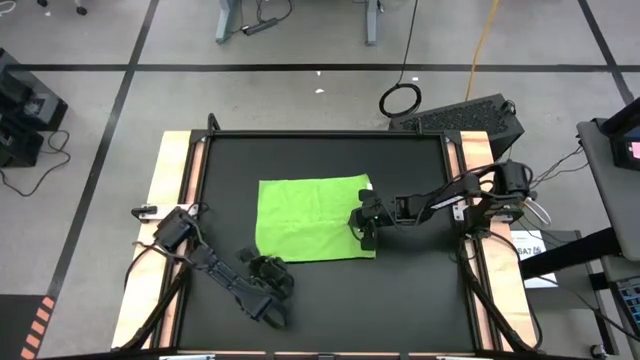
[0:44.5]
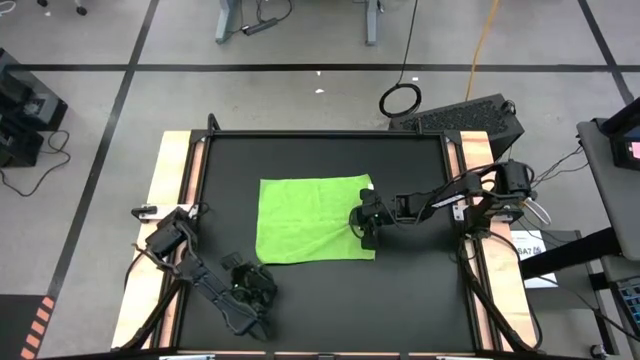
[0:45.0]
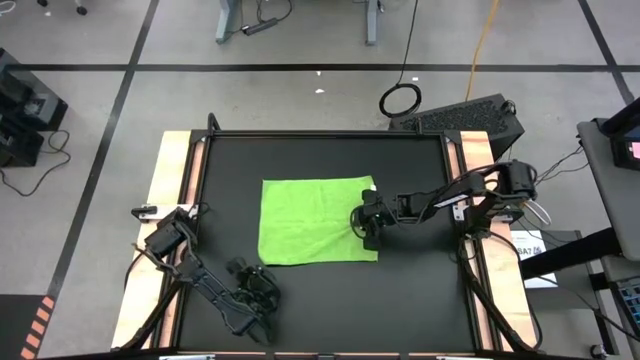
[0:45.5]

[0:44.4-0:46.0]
Task: Roll towel
Fold green microfiber towel

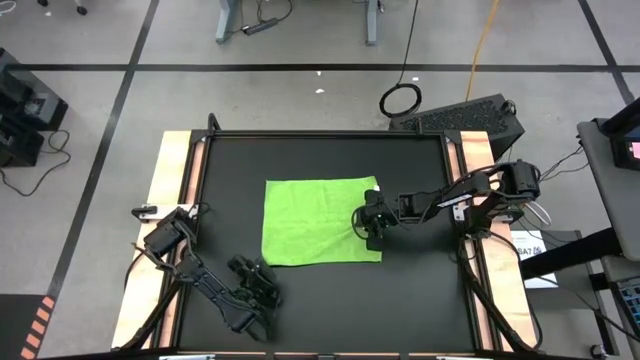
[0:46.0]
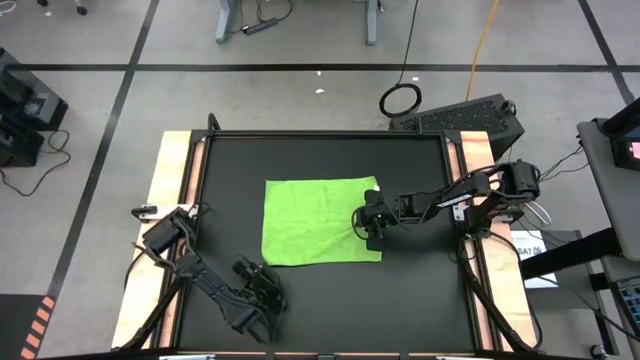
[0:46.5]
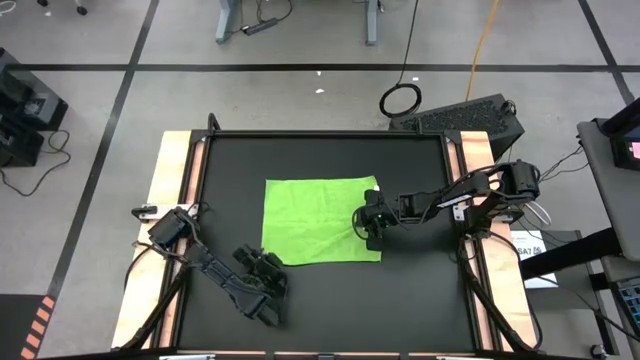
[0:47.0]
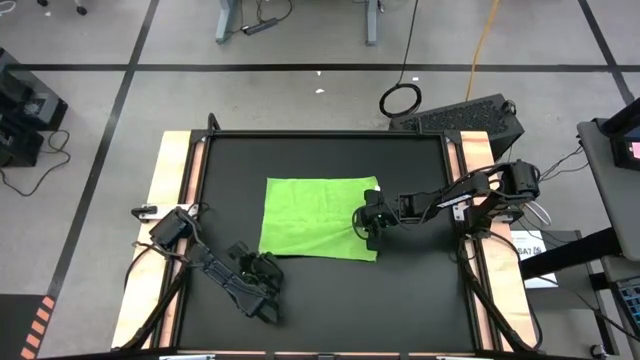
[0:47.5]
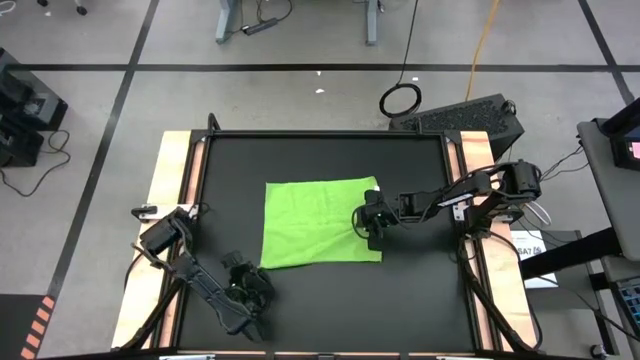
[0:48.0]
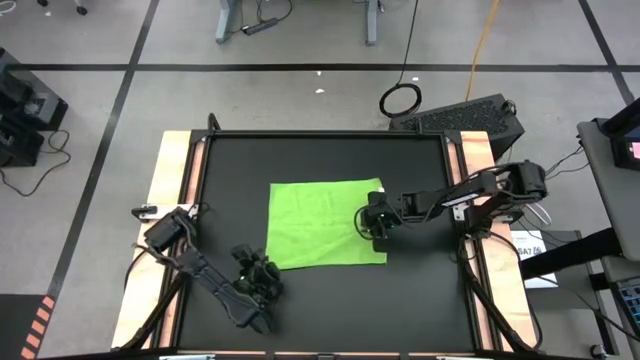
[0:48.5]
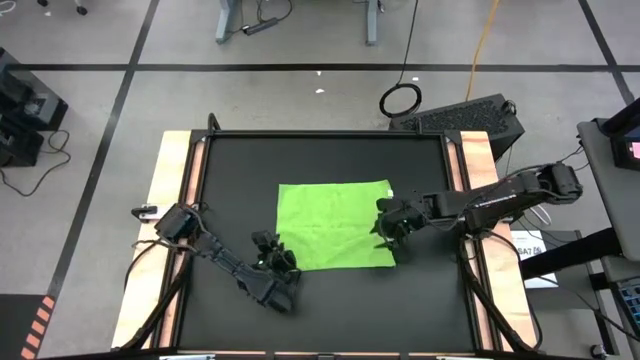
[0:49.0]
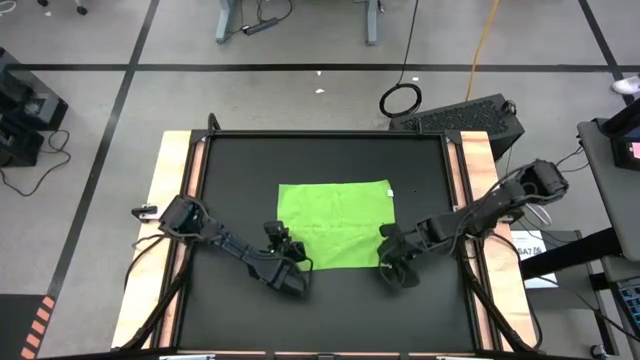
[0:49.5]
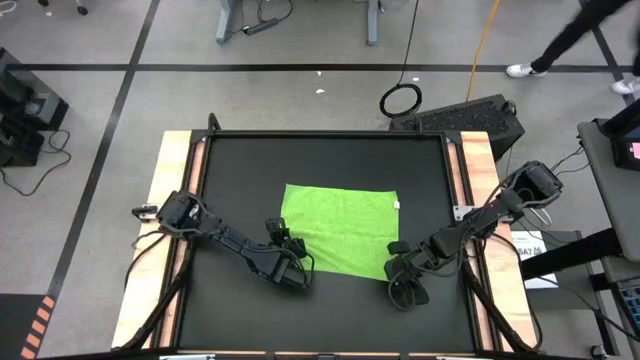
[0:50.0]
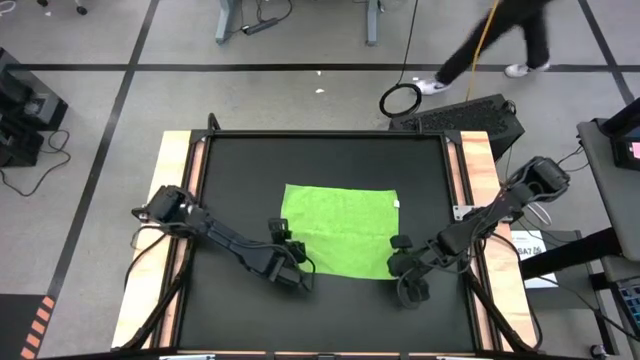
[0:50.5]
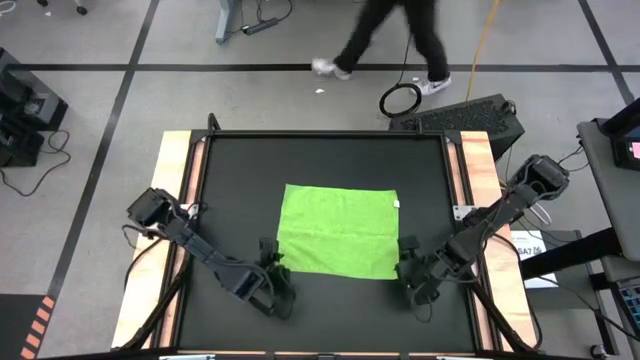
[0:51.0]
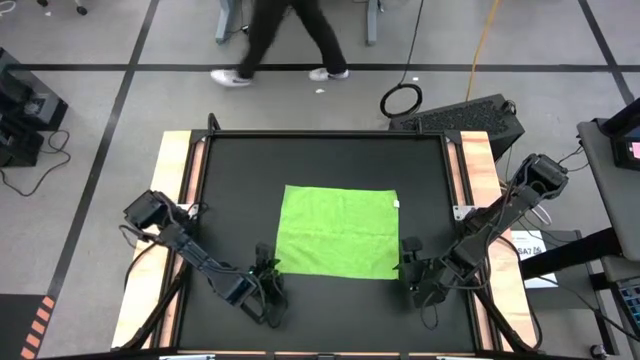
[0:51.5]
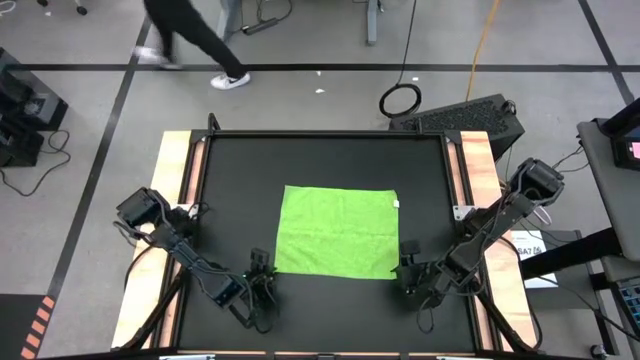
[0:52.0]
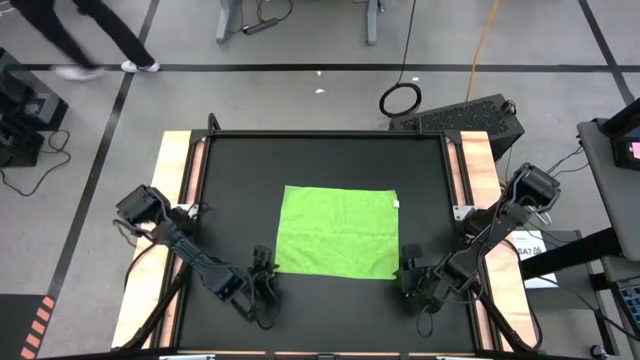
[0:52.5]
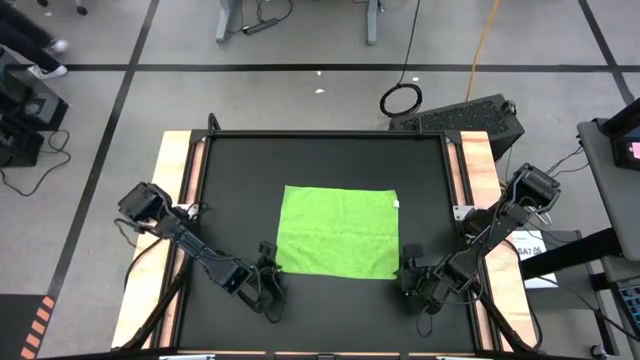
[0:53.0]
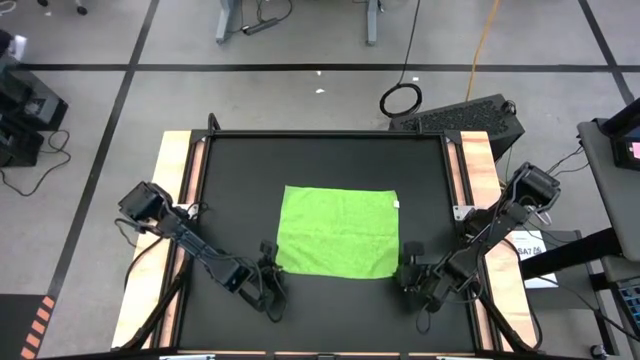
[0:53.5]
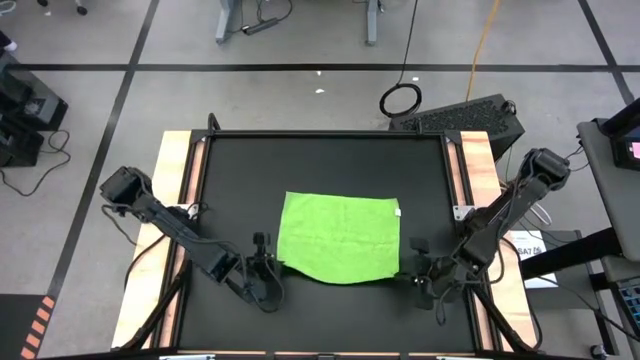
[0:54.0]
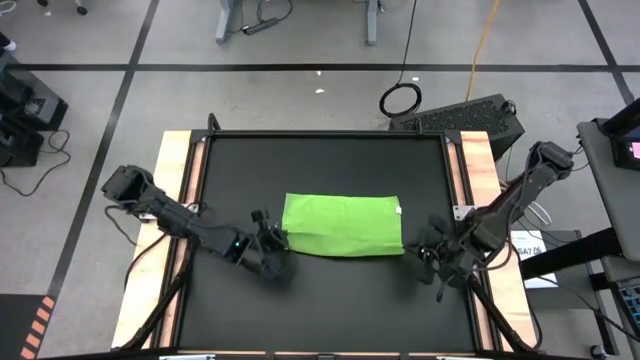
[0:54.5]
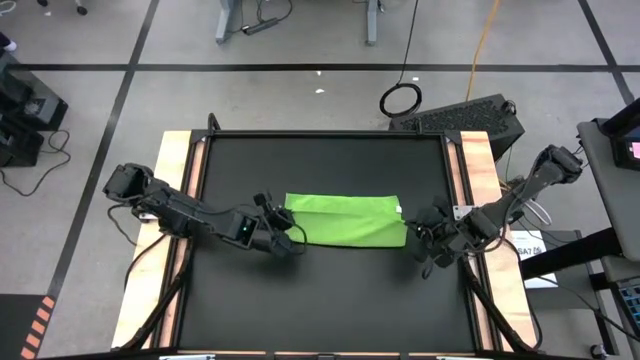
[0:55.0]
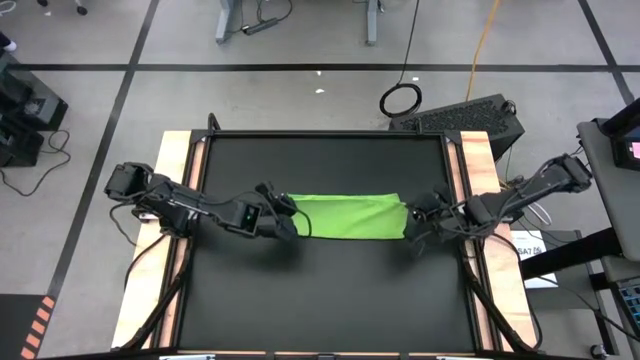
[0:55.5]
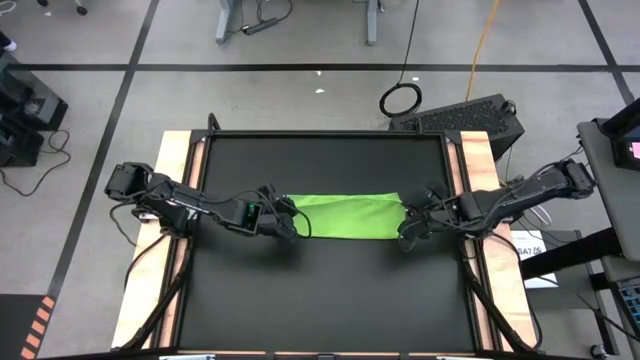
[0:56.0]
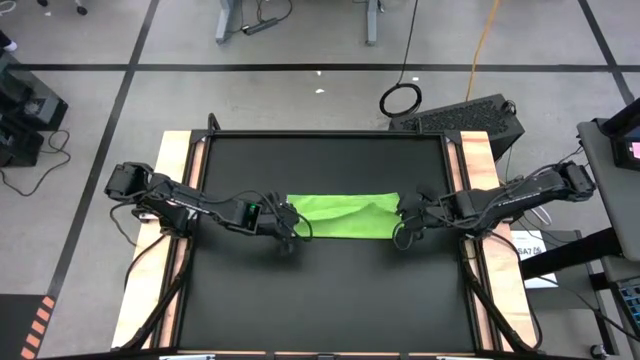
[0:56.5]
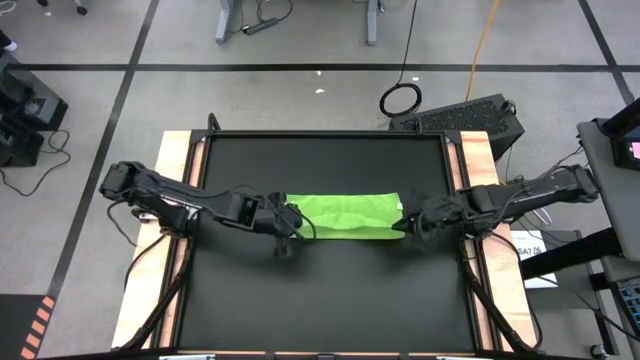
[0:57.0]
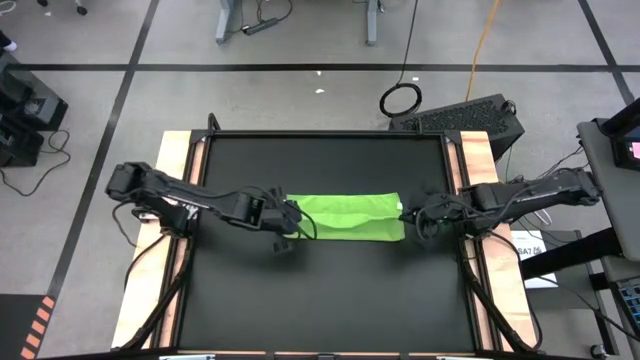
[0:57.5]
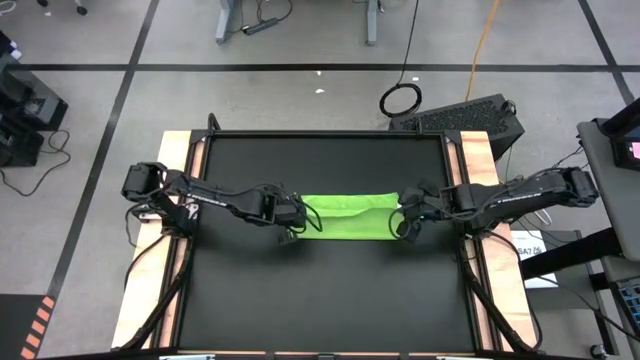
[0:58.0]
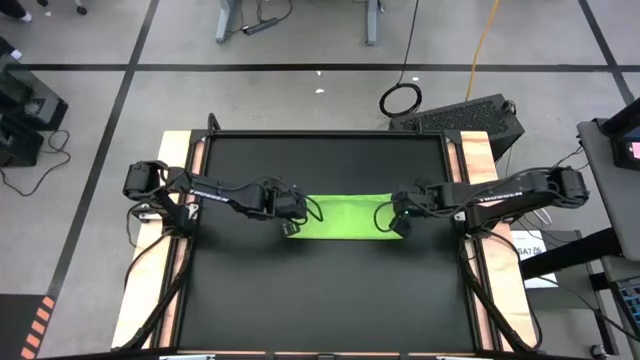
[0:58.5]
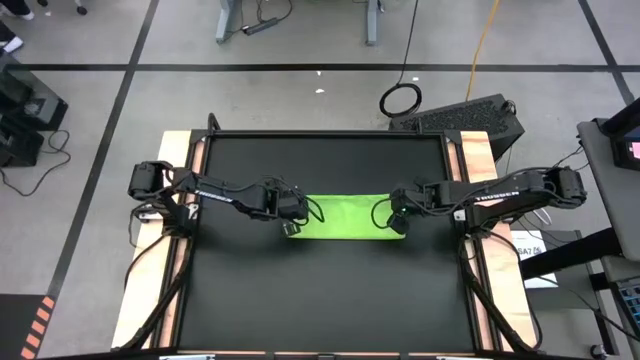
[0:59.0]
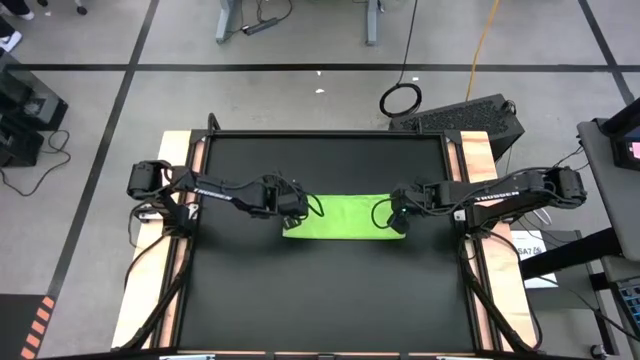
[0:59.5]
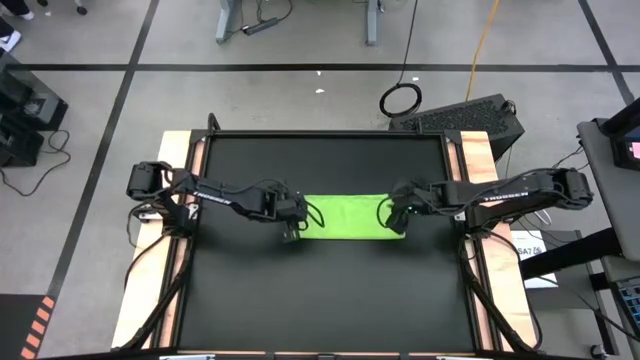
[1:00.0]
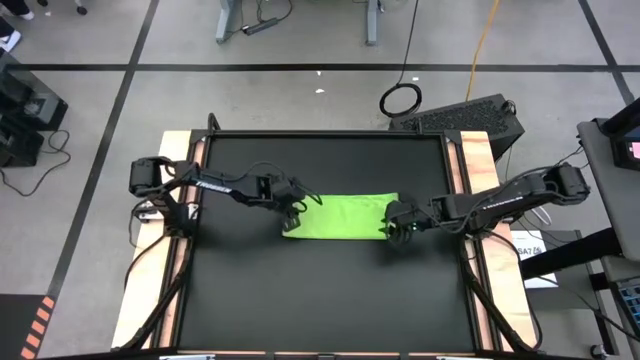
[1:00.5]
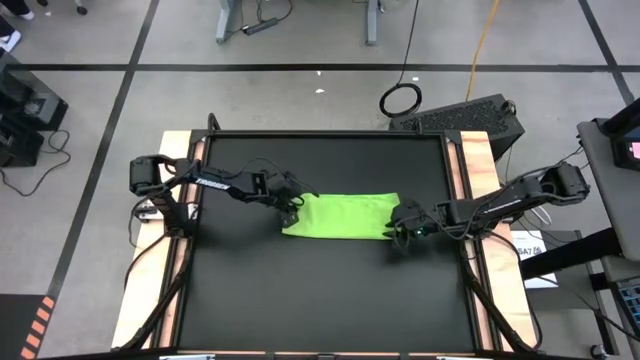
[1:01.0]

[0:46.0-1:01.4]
Fold green microfiber towel

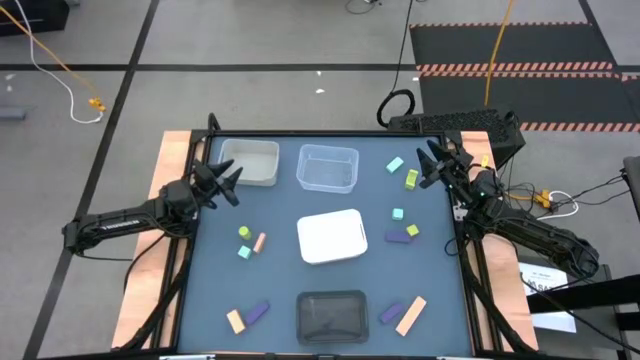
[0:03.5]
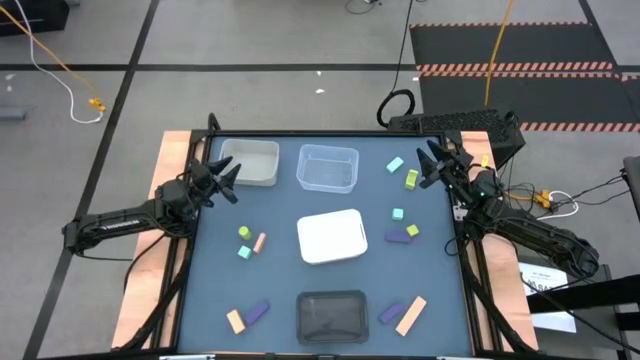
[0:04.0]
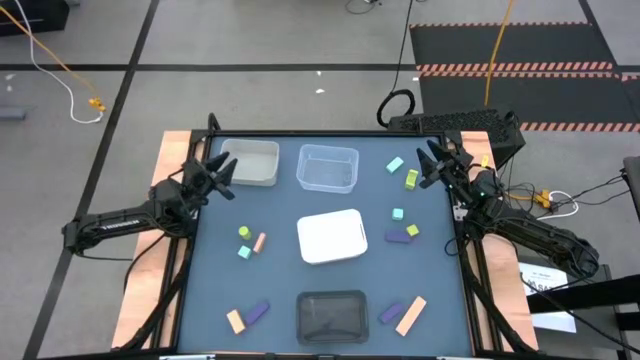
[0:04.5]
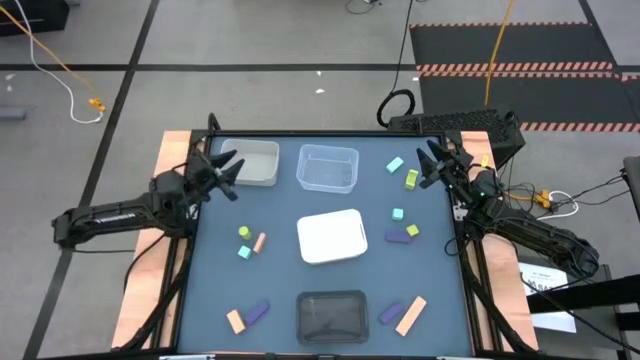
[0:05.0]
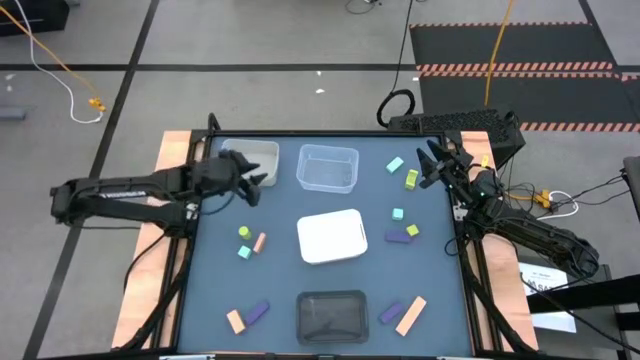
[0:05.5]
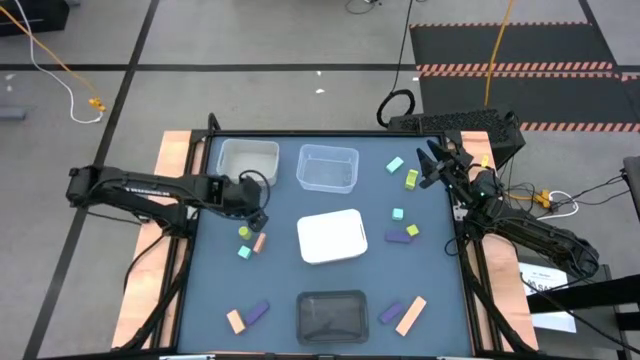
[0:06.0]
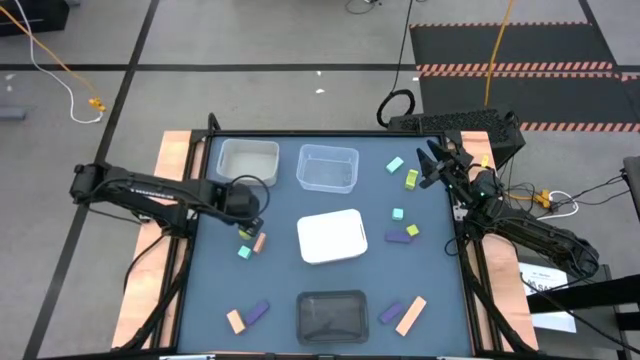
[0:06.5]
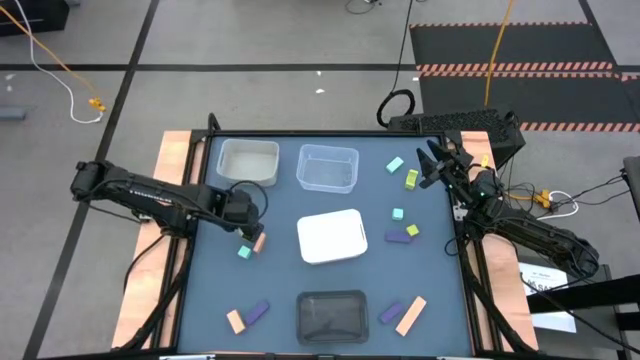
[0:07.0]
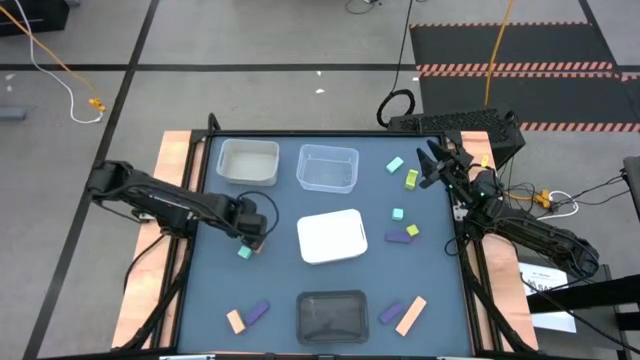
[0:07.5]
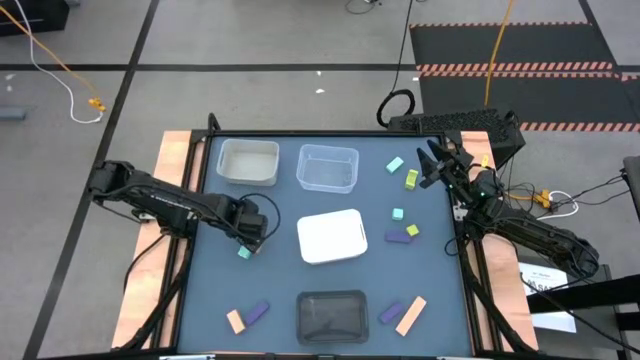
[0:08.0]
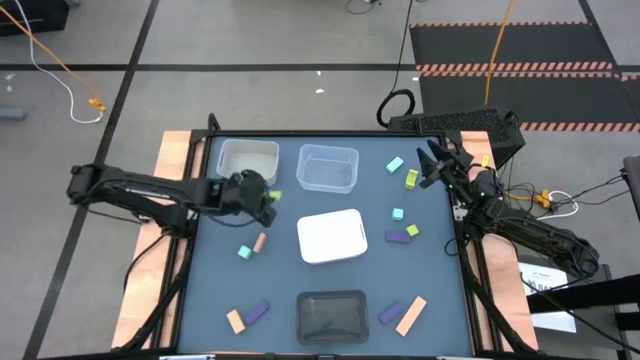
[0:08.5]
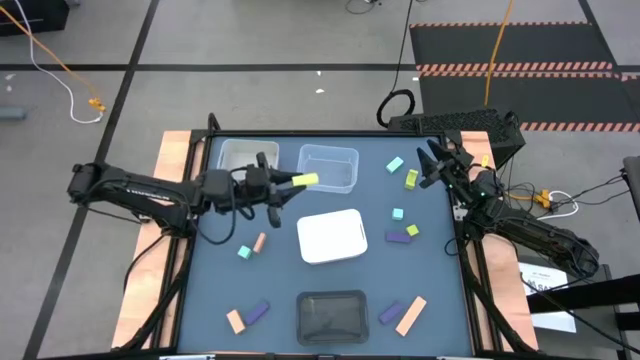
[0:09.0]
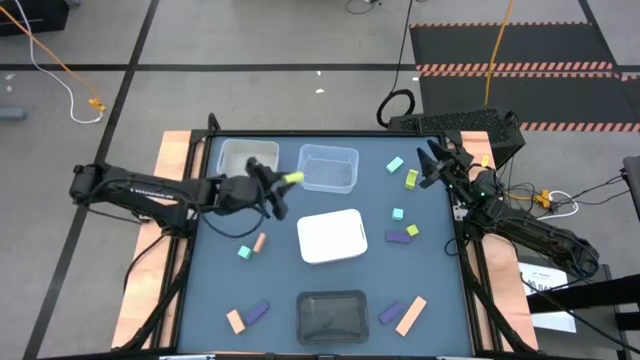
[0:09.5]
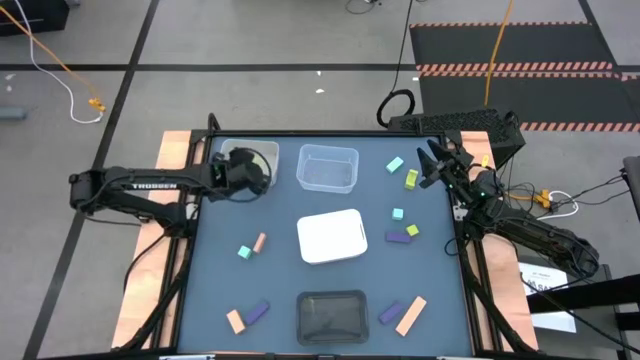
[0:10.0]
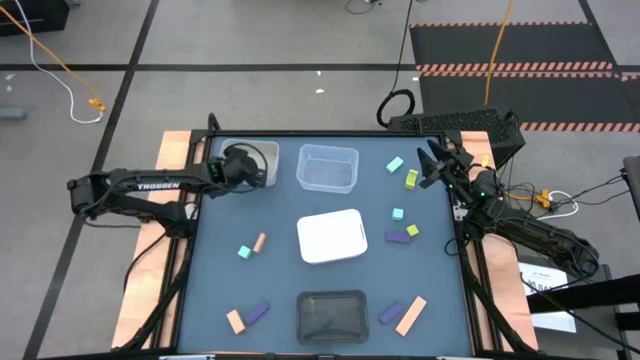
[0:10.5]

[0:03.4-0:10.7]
Task: Sort & place blocks by color
Put the bottom left light green block into the gray bin
